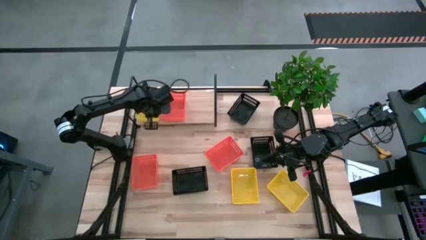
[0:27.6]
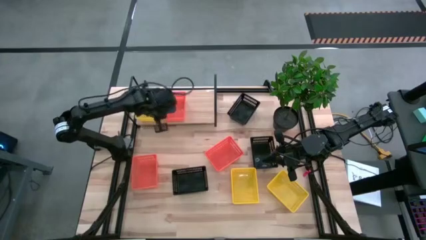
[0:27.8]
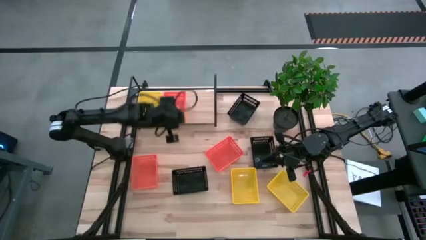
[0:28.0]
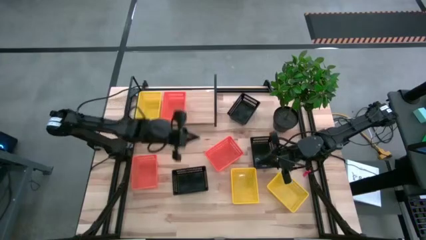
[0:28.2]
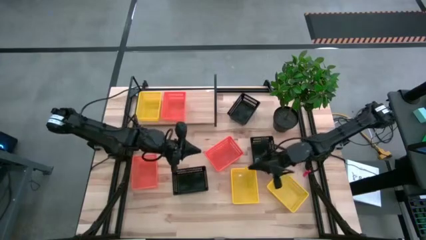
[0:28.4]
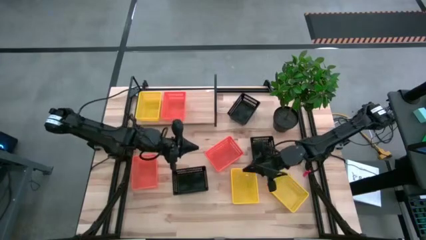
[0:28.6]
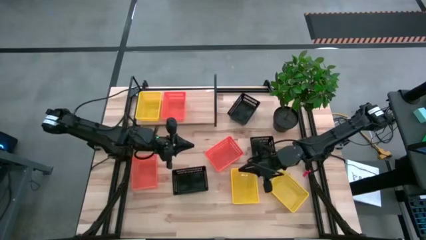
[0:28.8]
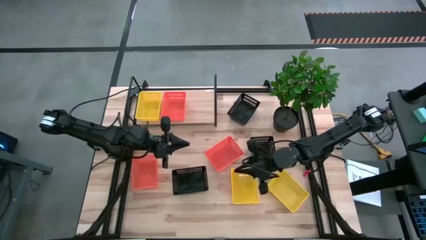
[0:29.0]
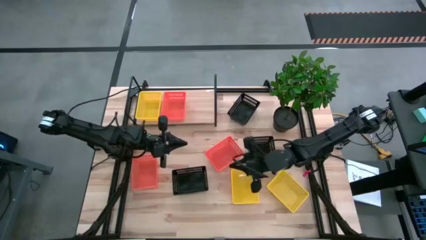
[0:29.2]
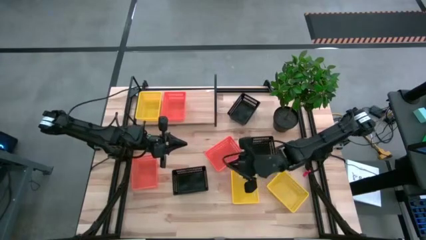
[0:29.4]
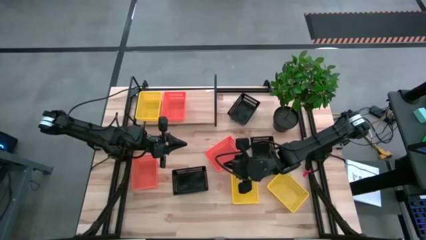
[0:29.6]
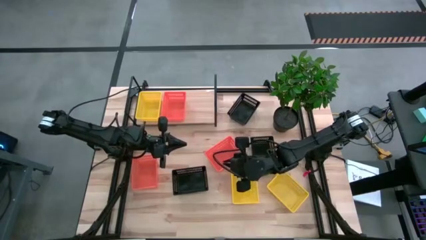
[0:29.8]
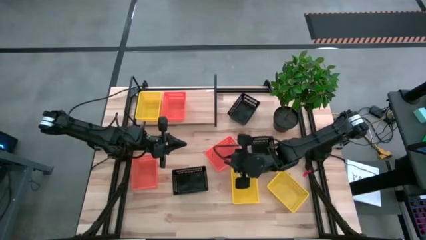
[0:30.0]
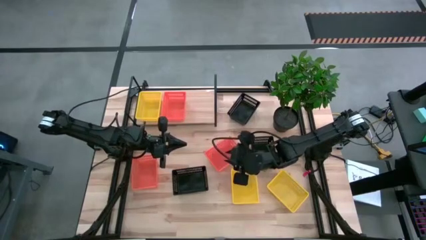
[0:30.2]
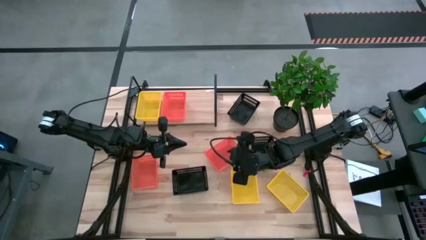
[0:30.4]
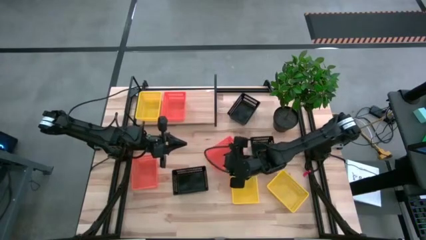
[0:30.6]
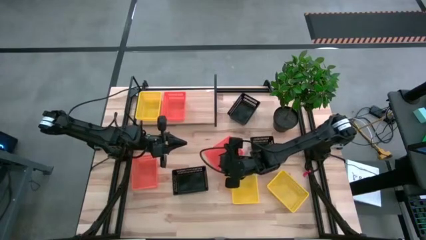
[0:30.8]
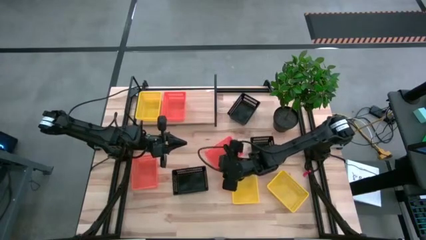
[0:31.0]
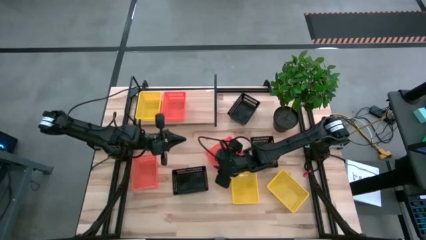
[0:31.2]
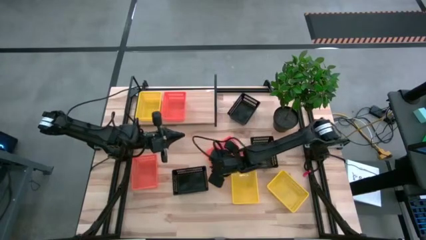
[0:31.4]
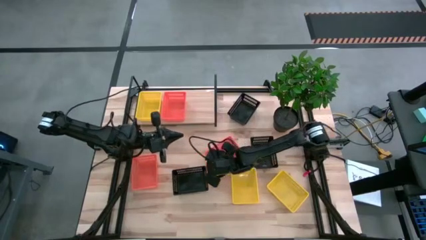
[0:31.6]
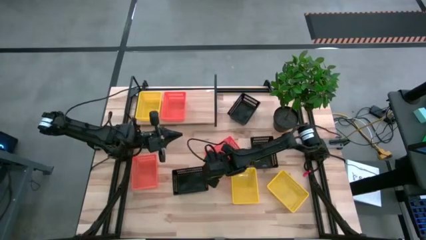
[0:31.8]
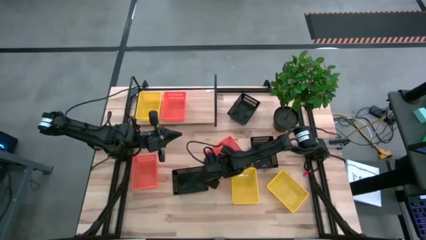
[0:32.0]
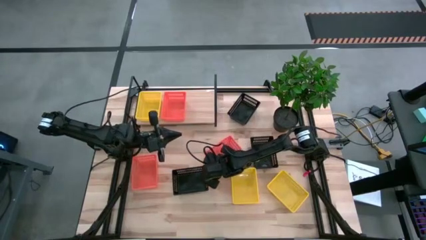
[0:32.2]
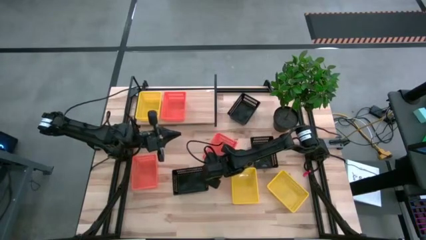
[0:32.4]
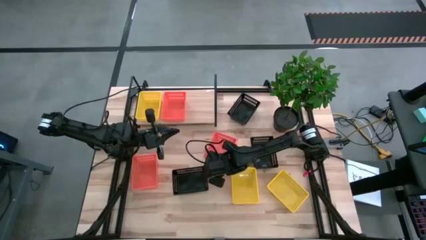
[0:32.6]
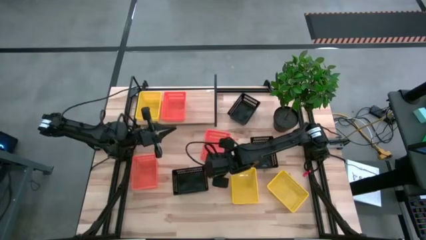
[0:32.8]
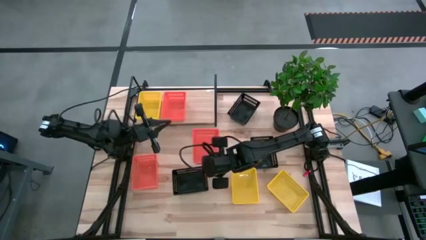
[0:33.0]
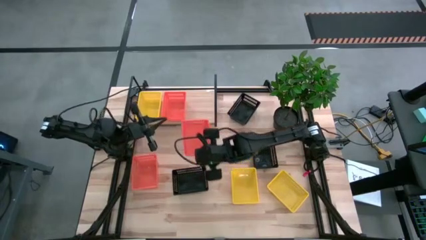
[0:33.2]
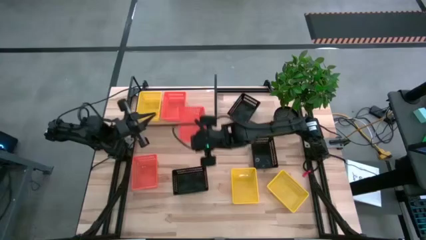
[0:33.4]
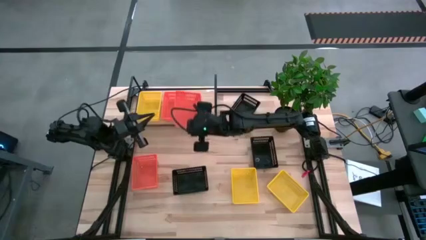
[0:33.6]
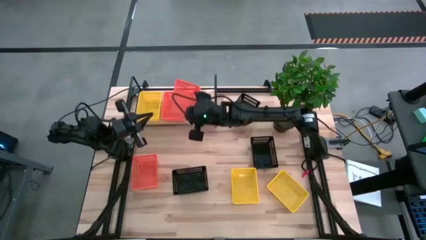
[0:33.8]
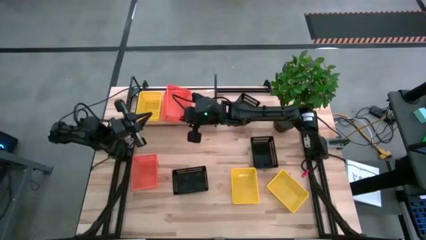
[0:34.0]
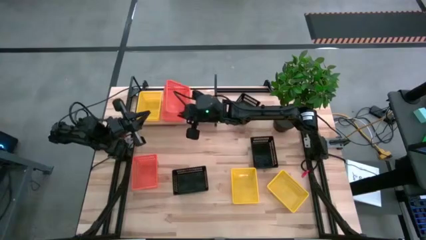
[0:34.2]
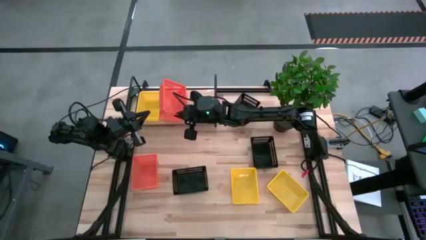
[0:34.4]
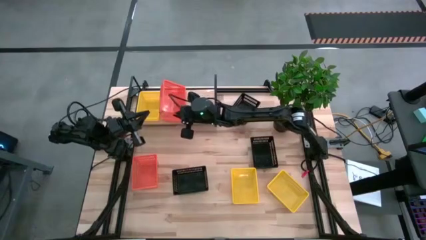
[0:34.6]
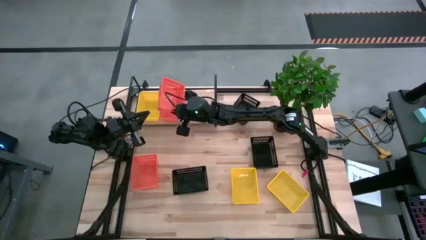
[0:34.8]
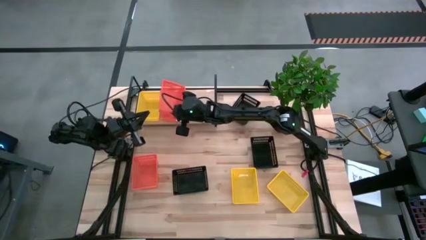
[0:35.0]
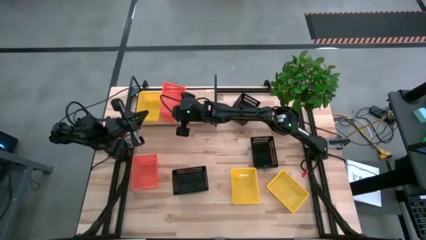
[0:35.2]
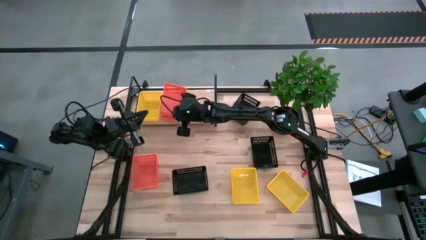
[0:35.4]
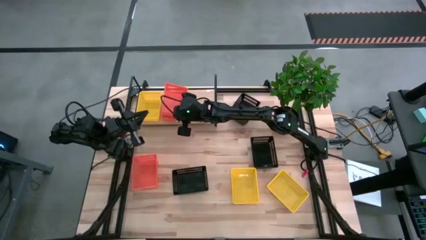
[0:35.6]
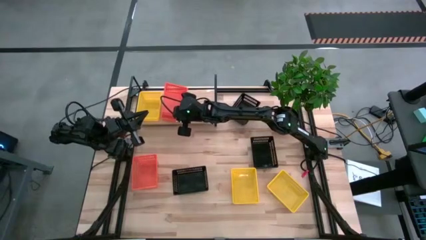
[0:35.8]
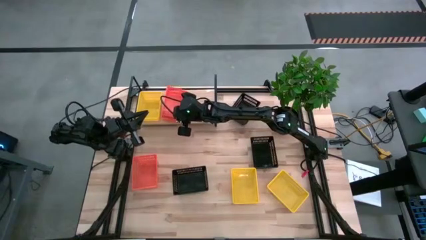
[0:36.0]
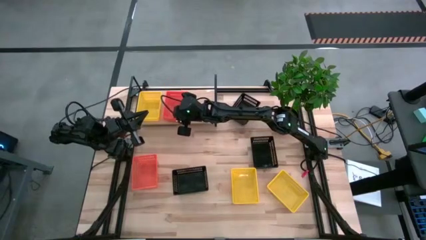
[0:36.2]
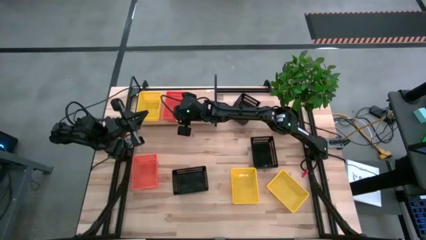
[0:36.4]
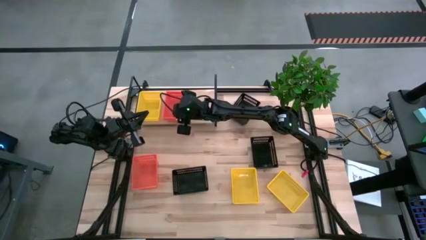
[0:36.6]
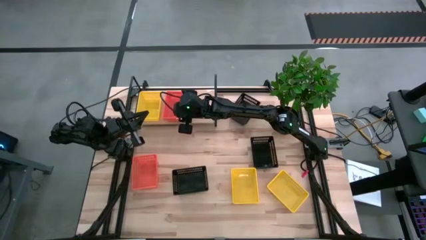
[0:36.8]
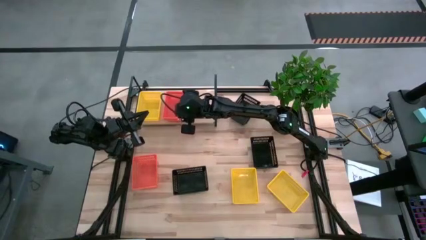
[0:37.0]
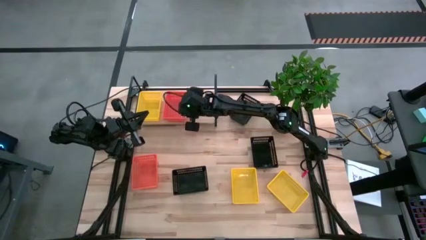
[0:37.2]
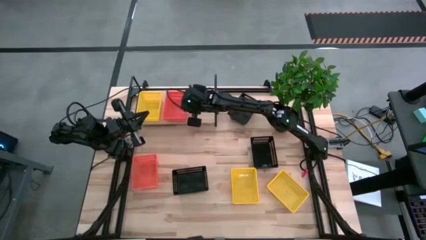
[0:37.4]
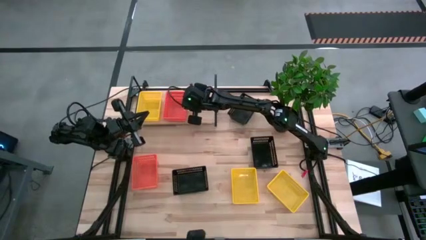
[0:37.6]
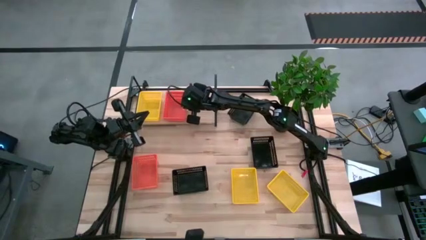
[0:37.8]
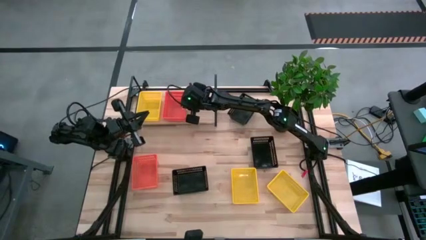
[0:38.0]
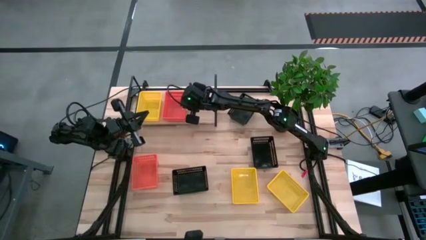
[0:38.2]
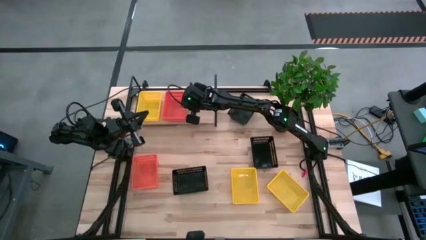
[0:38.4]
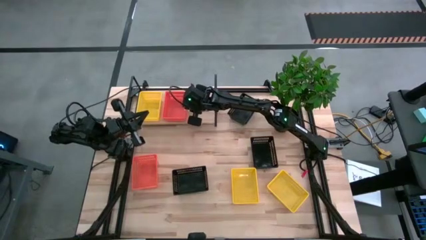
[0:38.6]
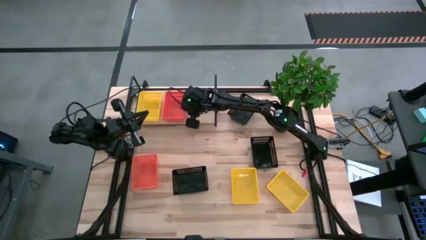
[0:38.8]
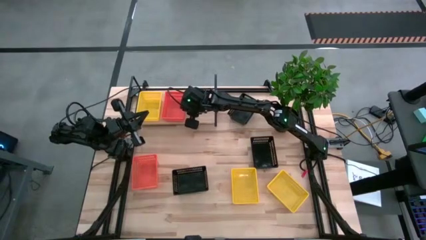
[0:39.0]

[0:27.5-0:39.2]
Task: Stack baskets on shelf by color
Stack the right orange bin on the orange bin on the shelf

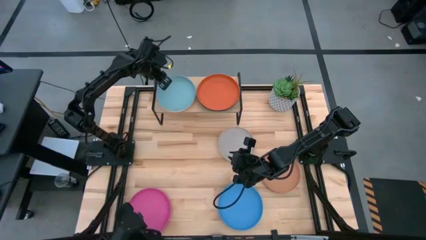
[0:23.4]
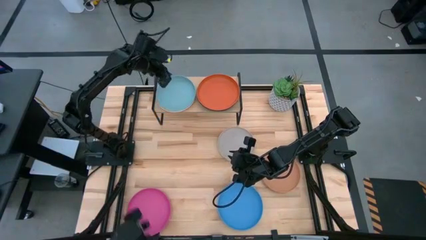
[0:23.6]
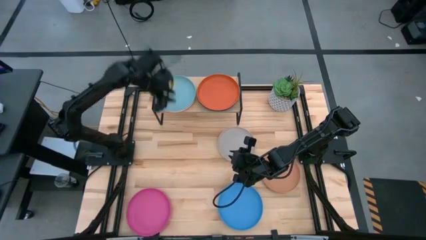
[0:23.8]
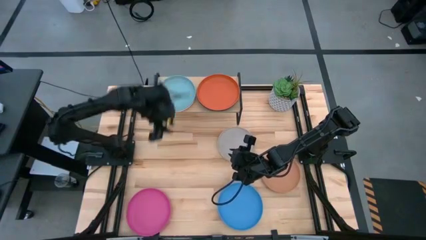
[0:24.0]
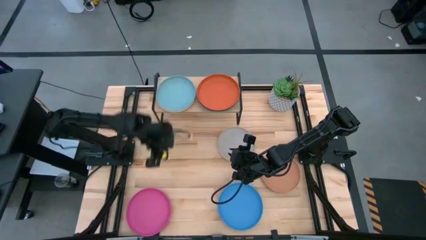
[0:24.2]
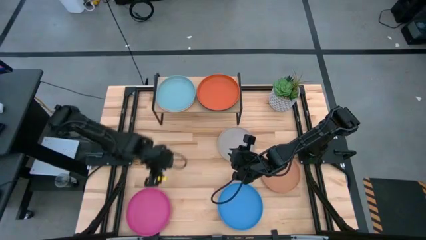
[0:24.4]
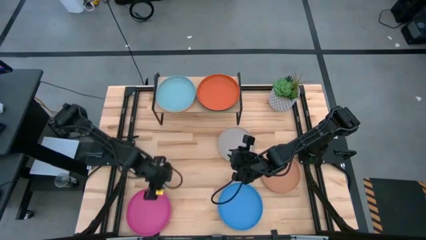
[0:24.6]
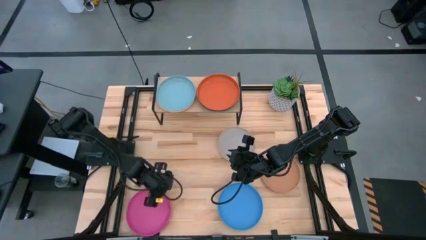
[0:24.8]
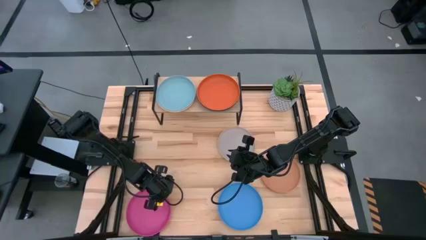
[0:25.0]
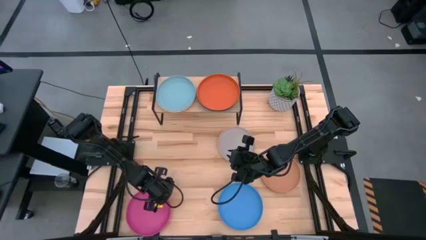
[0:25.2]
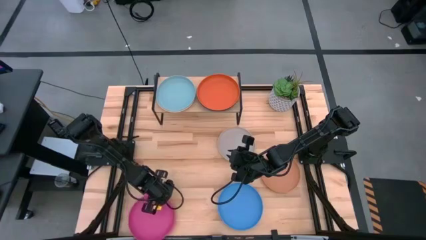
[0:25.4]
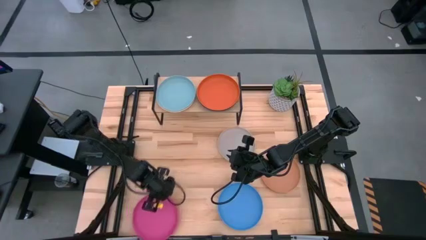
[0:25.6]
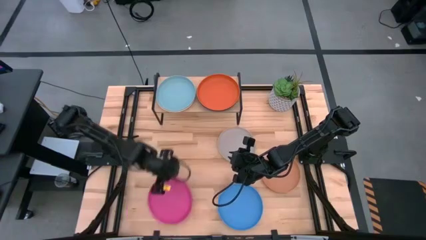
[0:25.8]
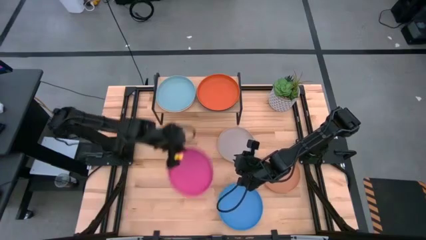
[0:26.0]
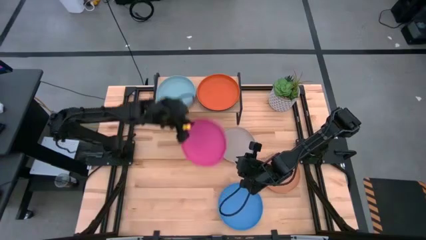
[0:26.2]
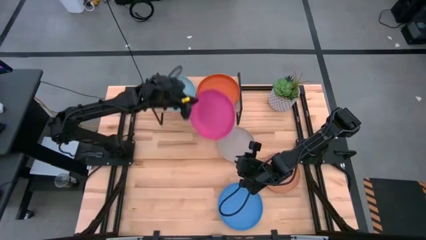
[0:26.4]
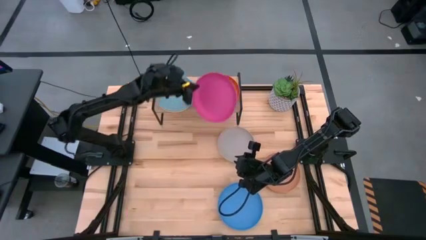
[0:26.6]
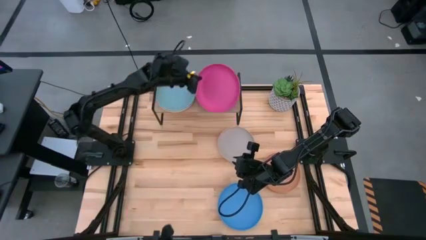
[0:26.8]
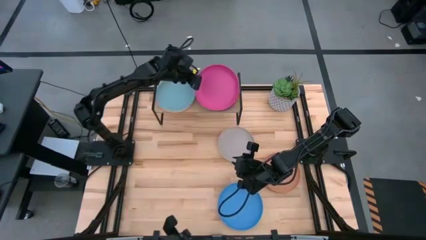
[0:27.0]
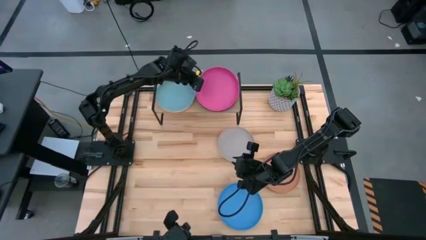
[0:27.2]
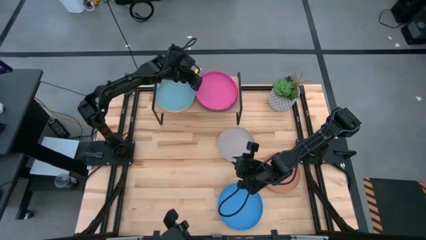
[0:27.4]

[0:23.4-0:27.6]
Task: Place and stack plates onto a shelf
Stack the pink plate on top of the orange plate on the shelf
